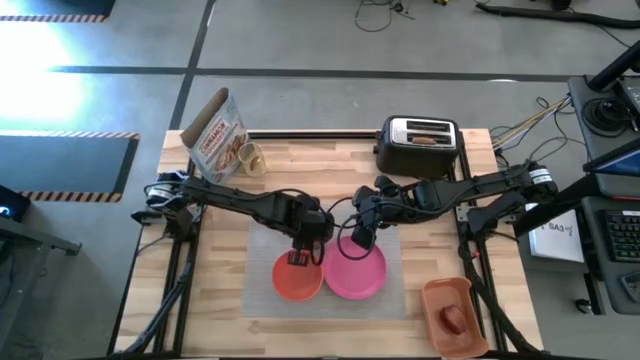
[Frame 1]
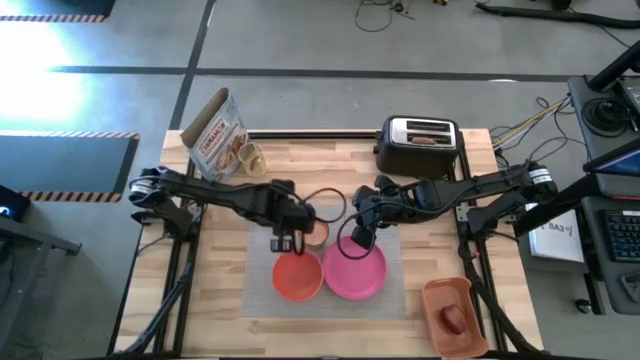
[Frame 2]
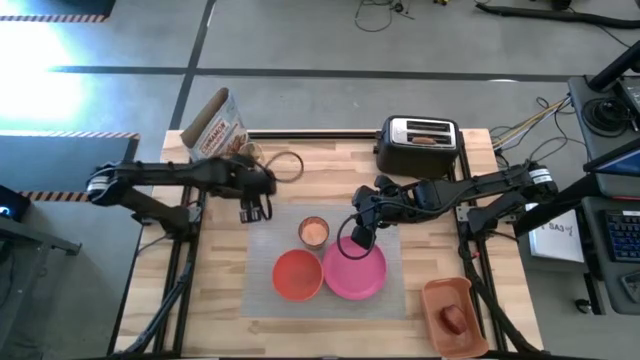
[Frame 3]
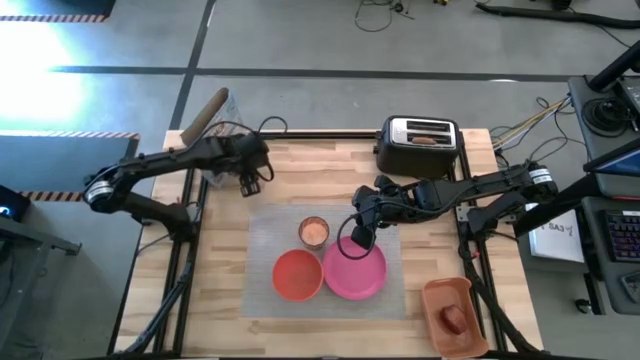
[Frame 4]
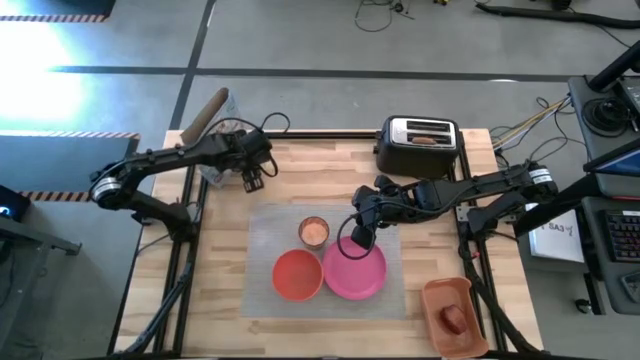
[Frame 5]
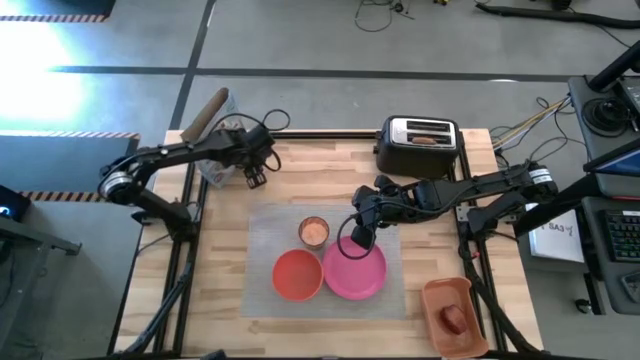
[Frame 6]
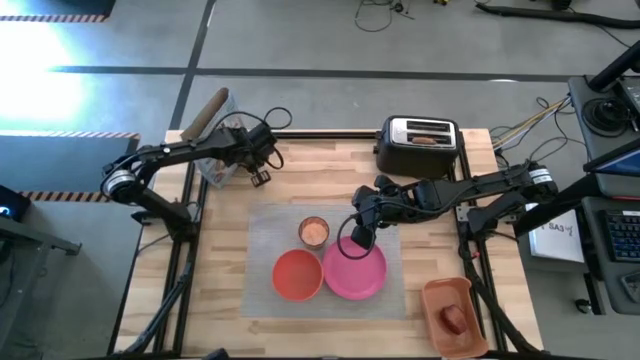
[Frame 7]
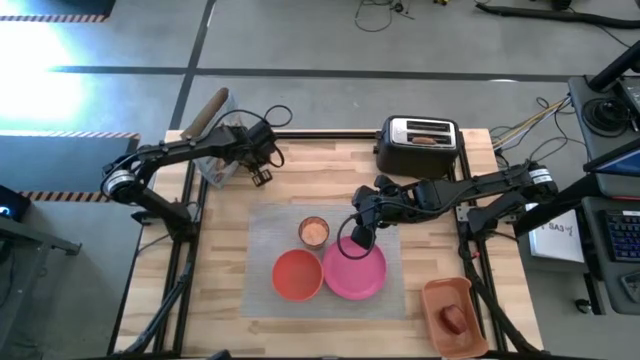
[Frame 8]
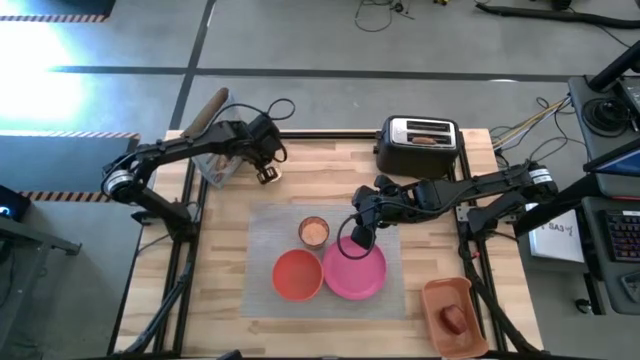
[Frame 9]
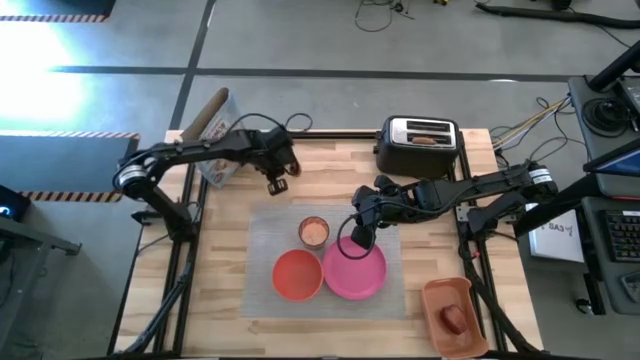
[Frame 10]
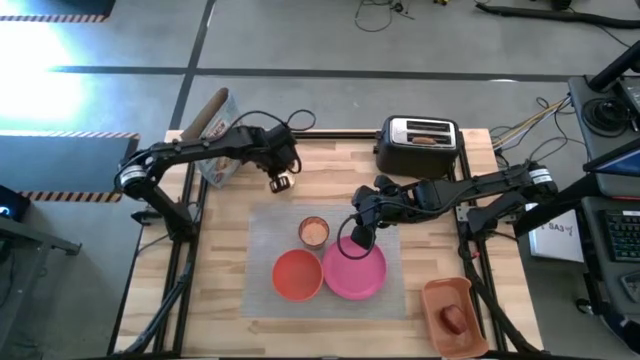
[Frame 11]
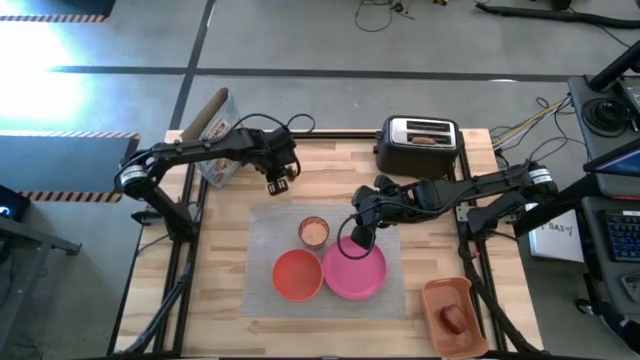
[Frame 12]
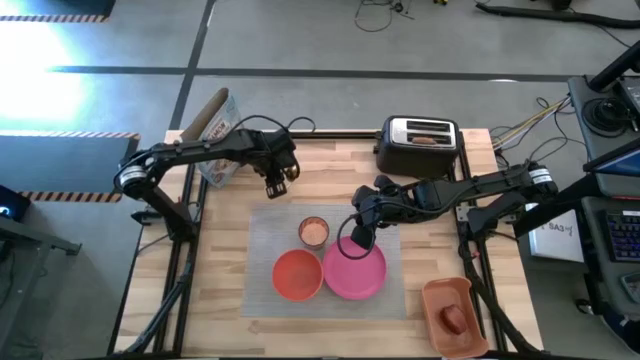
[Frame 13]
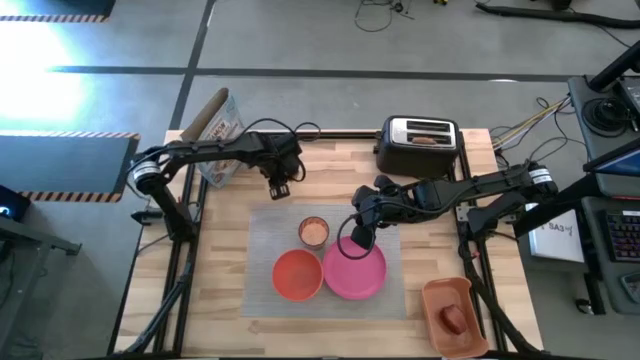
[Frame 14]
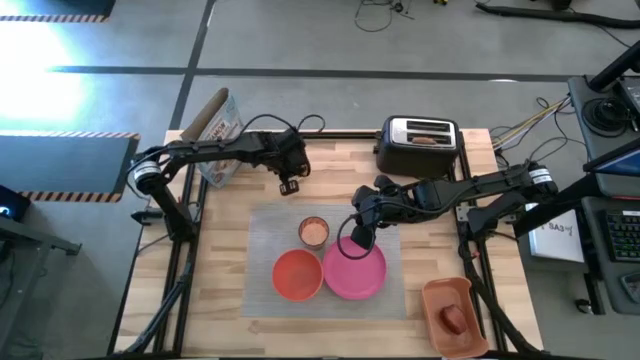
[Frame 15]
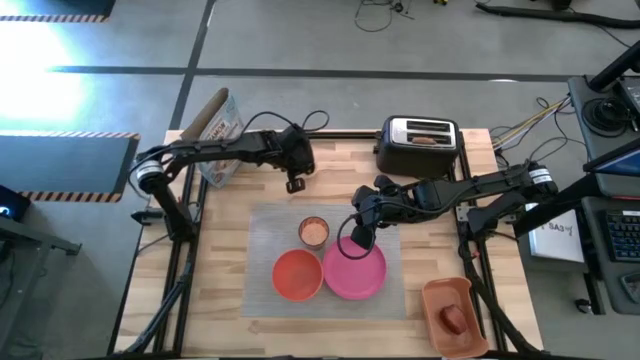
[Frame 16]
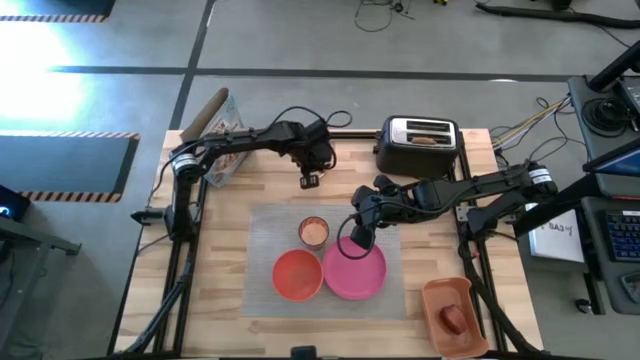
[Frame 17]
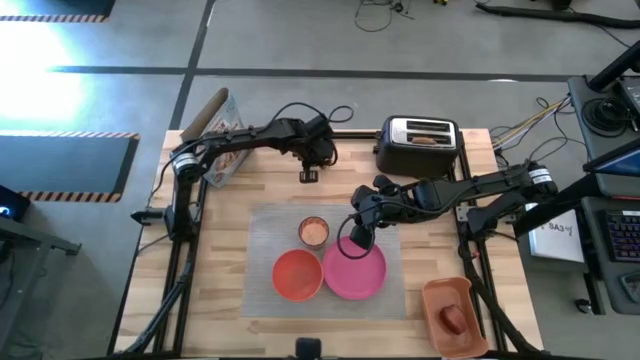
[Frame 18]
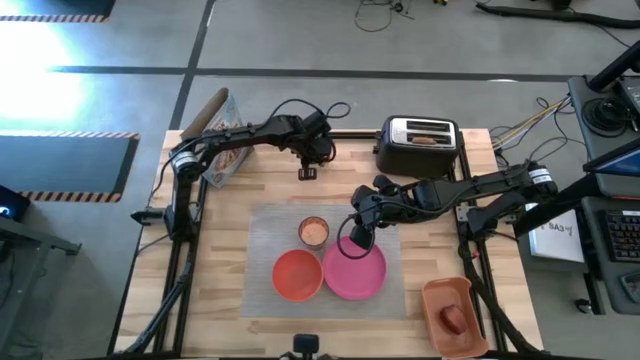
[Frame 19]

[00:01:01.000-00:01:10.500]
Task: Arrange a breakfast setting
Move the golden utensil container to the top middle of the table

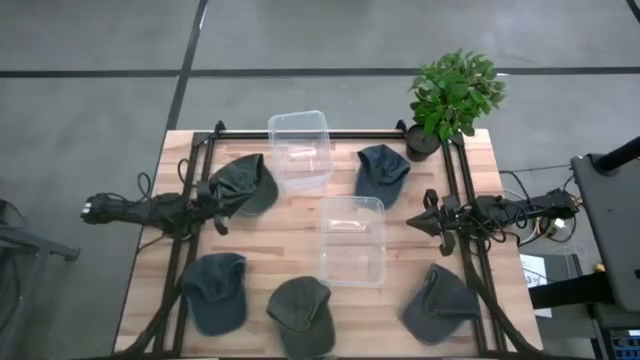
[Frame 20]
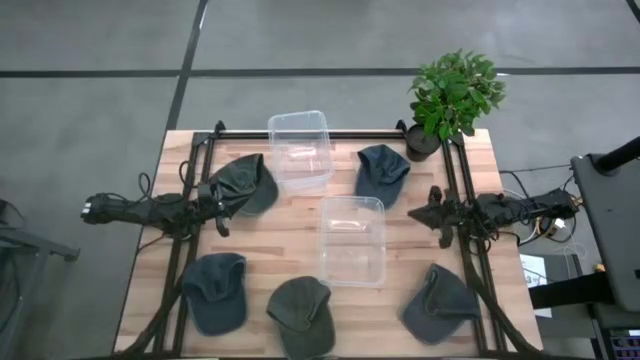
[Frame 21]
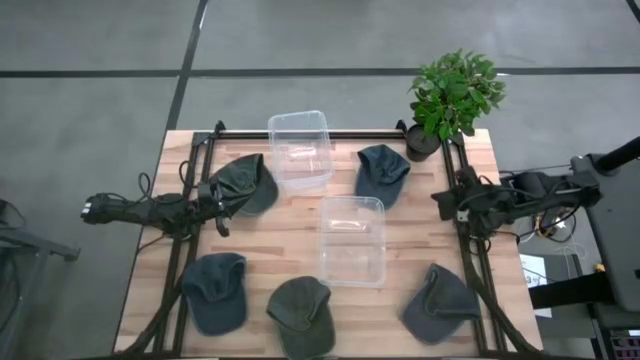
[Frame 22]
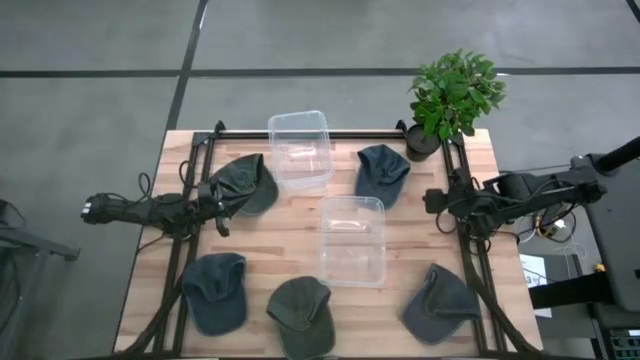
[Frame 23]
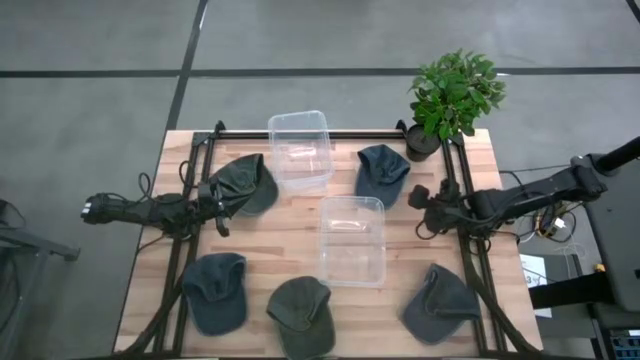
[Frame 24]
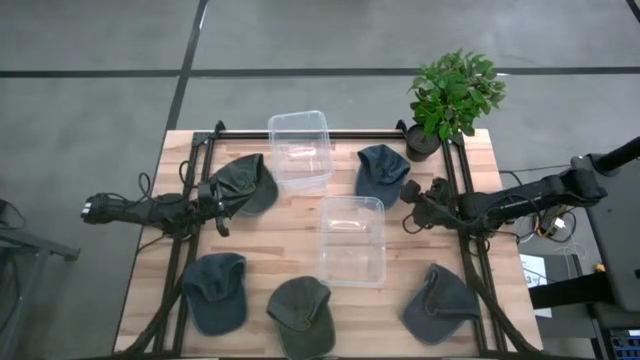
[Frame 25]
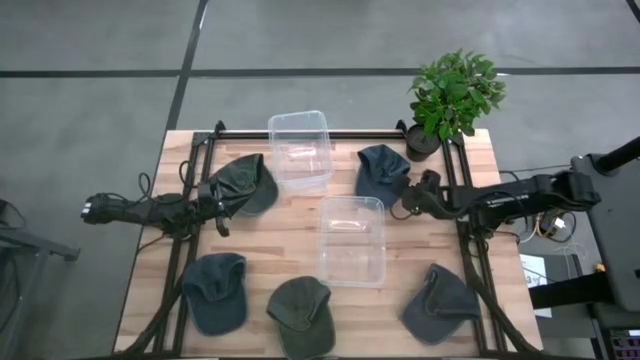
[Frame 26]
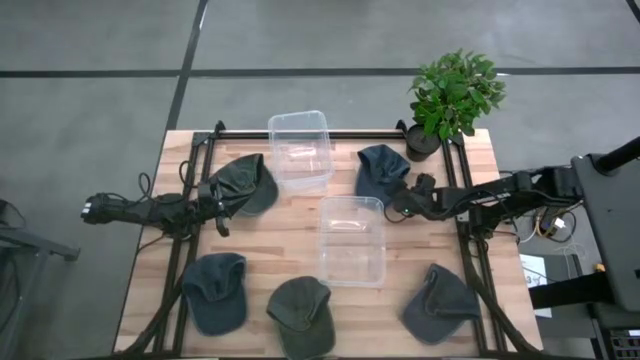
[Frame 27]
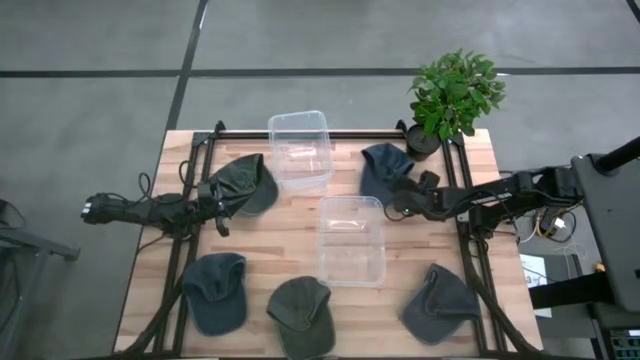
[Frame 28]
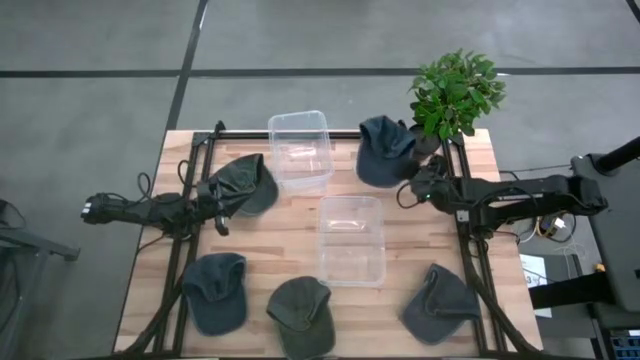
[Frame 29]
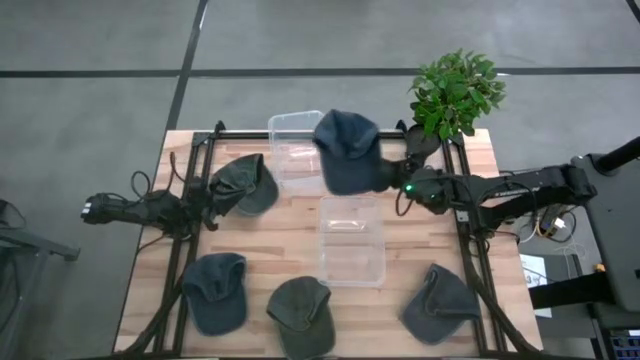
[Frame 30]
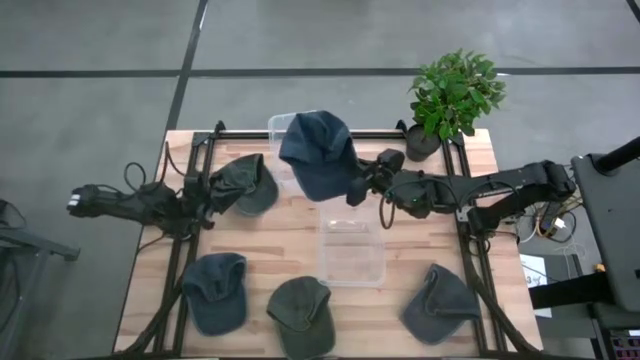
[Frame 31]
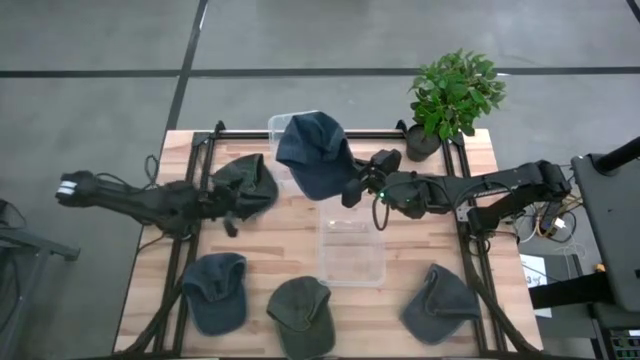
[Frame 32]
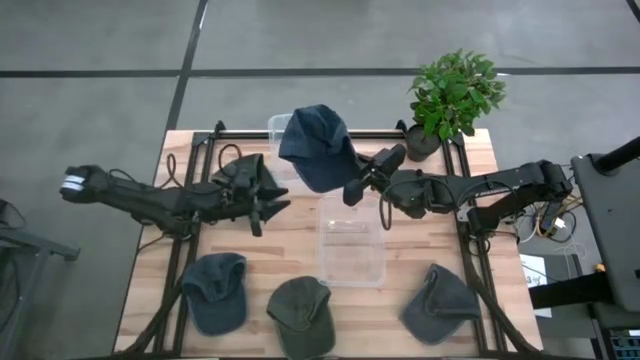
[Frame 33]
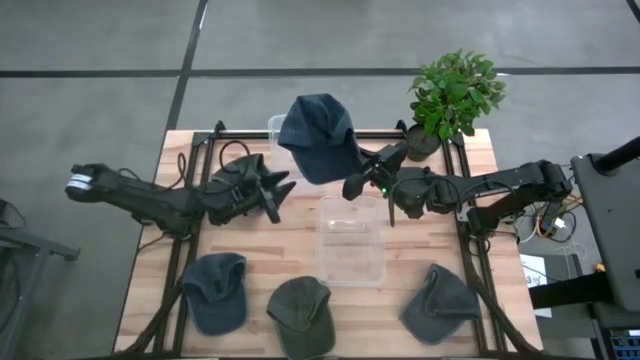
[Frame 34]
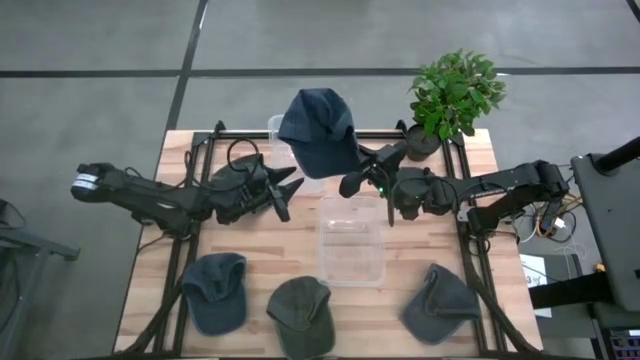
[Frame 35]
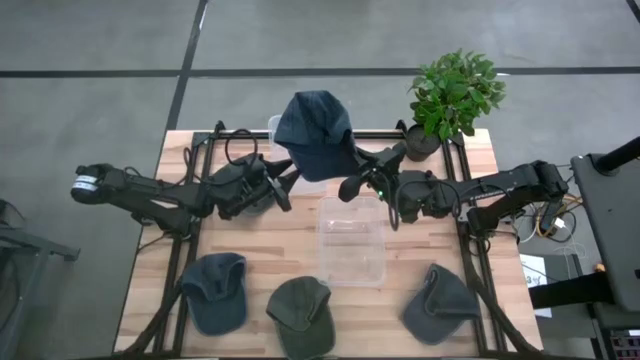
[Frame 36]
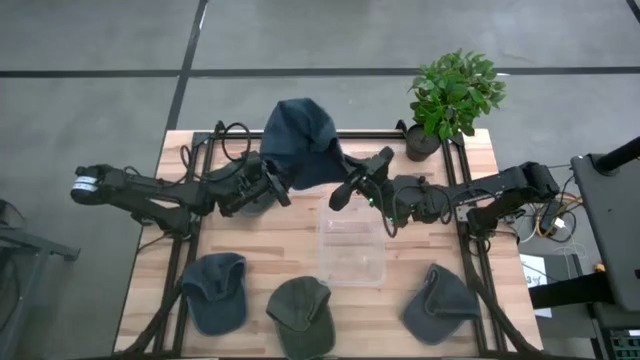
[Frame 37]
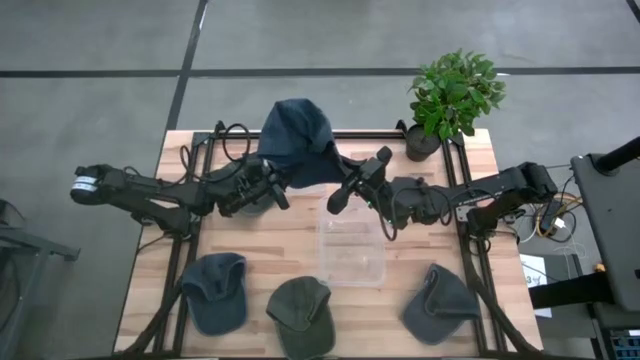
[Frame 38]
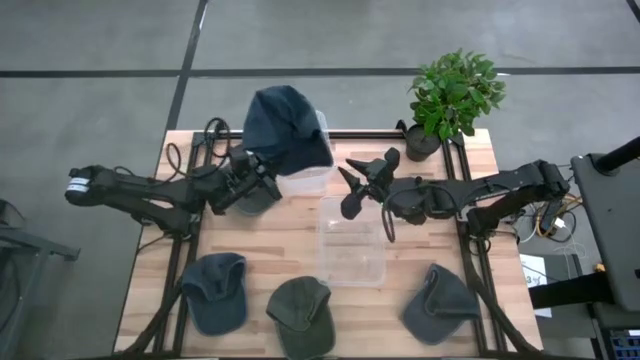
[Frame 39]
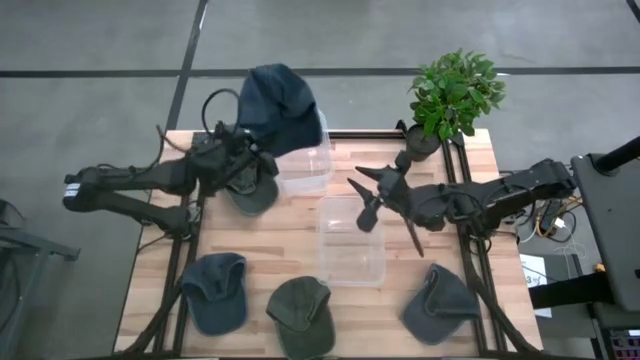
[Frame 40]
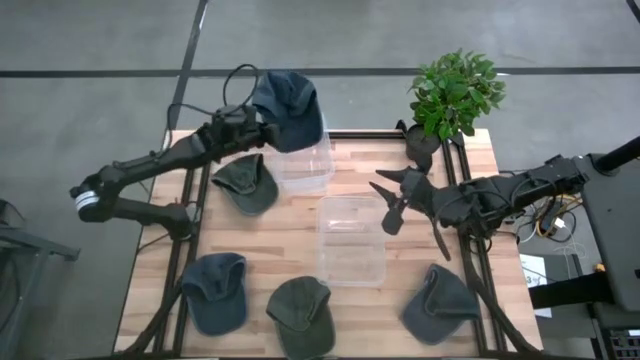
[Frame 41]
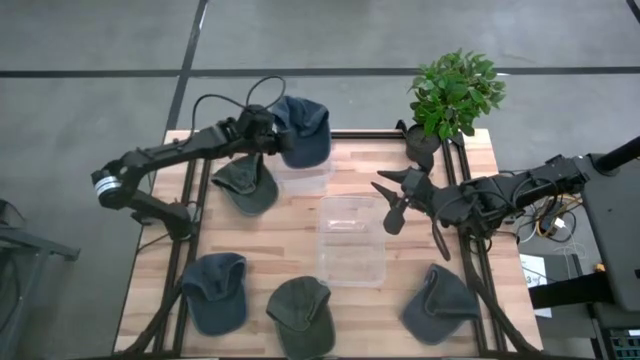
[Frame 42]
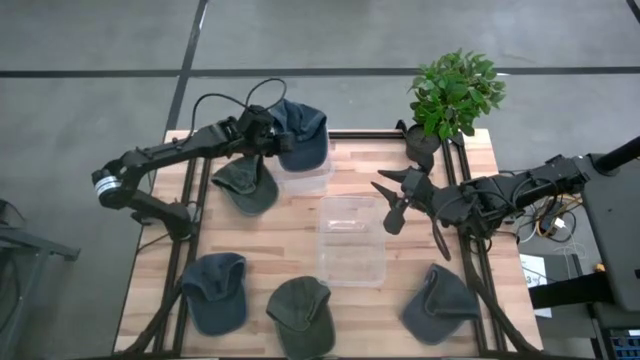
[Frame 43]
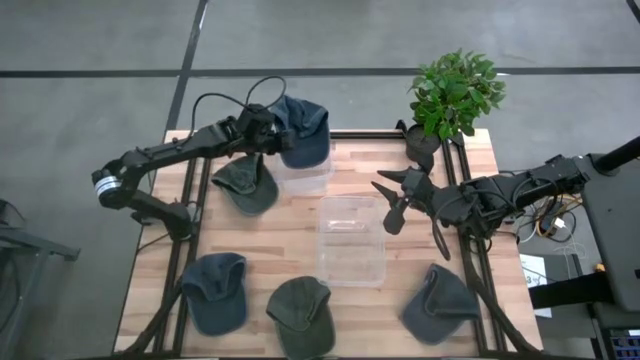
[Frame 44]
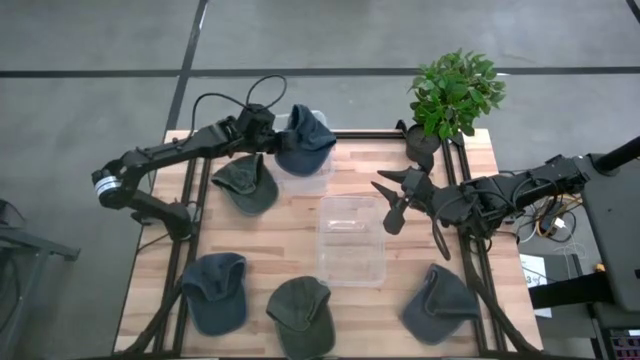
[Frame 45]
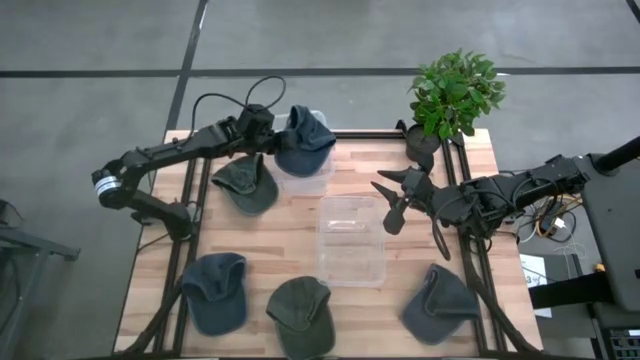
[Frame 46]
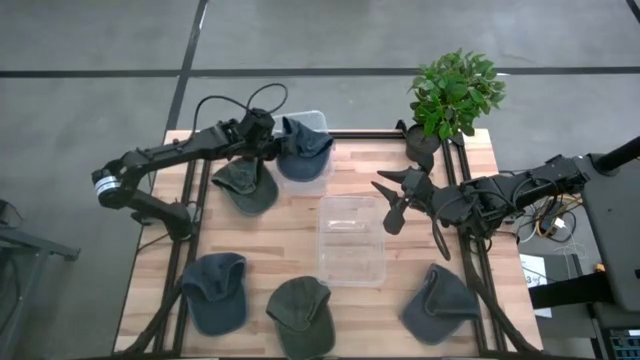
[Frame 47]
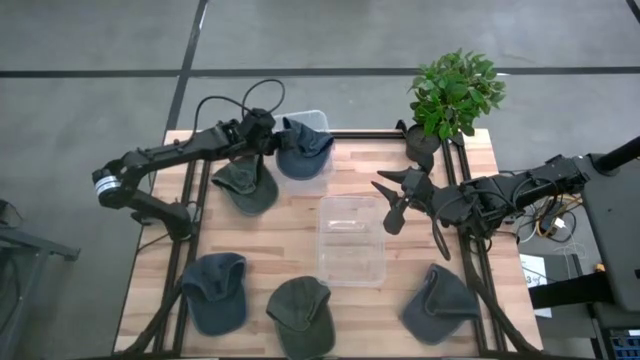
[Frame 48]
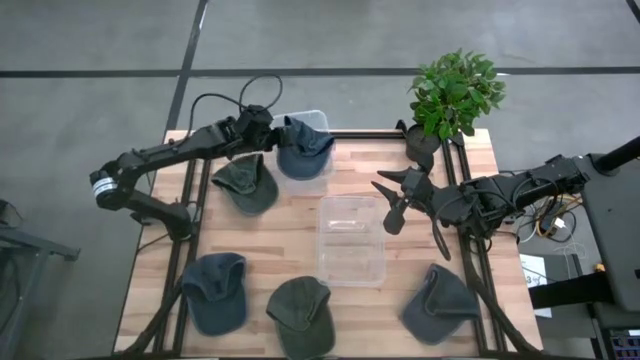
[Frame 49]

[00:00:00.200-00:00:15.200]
Task: Pick & Place hat
Put the top blue cap into the top transparent bin
